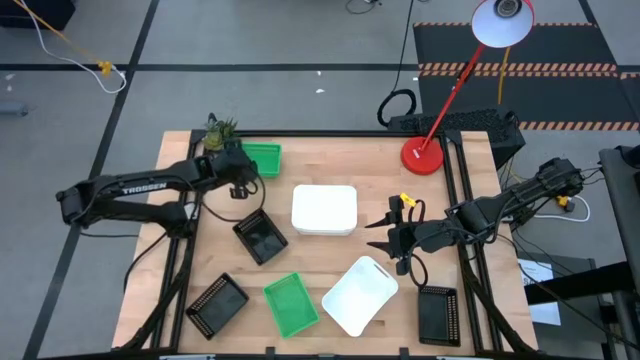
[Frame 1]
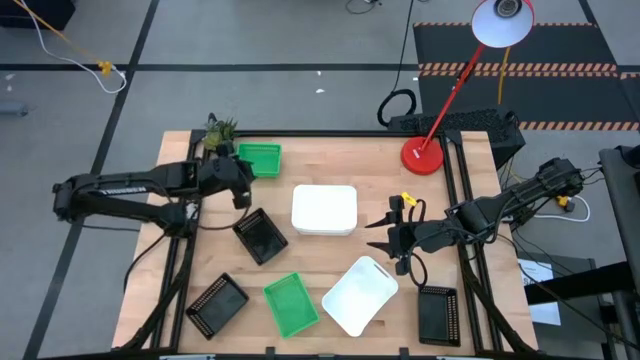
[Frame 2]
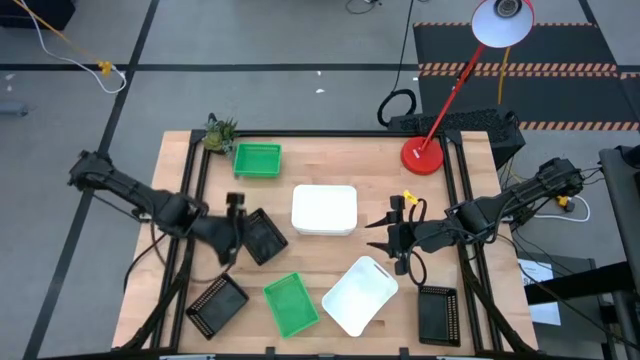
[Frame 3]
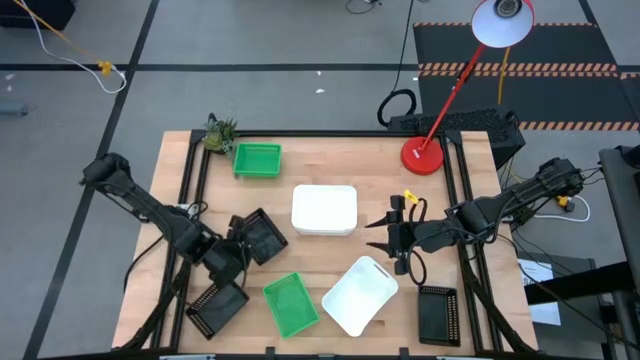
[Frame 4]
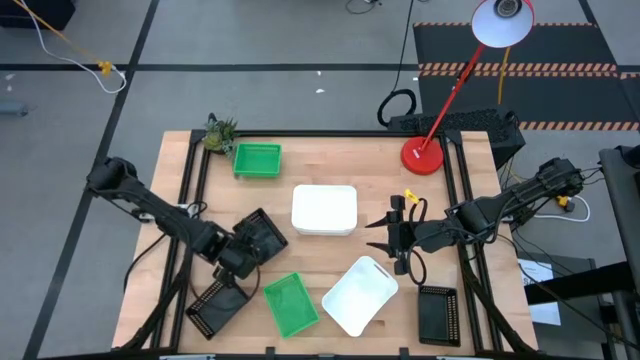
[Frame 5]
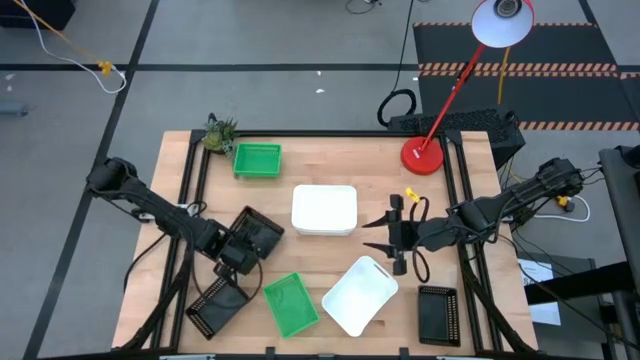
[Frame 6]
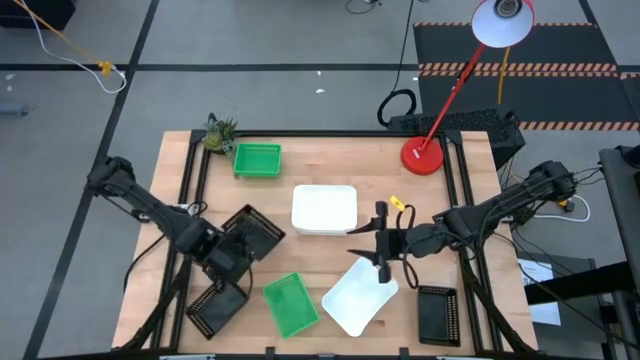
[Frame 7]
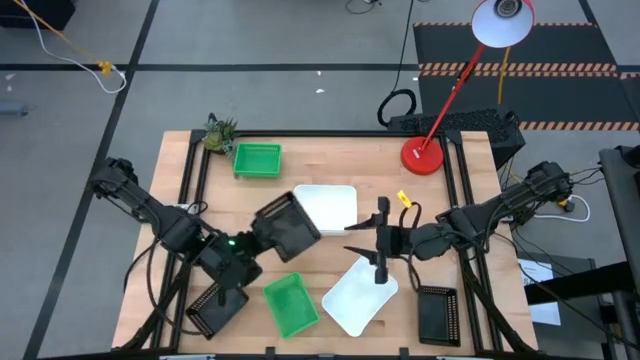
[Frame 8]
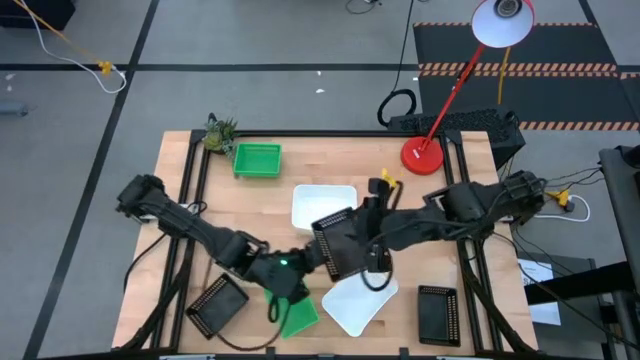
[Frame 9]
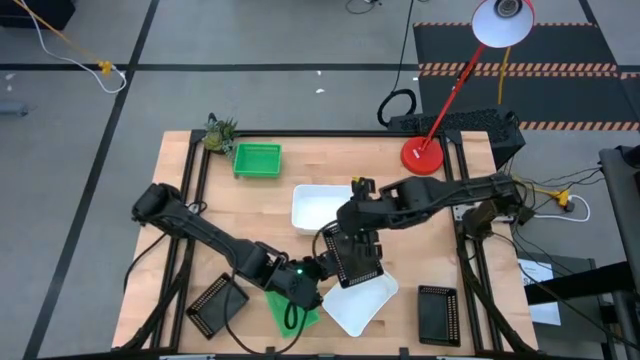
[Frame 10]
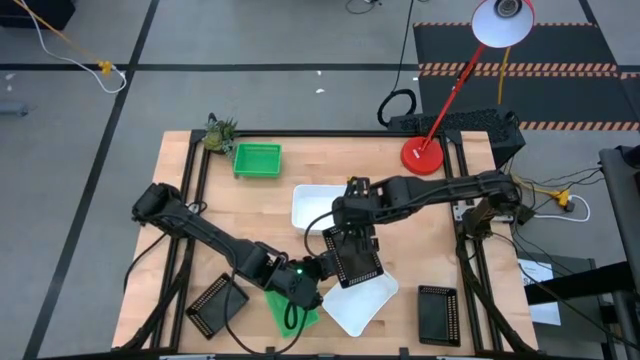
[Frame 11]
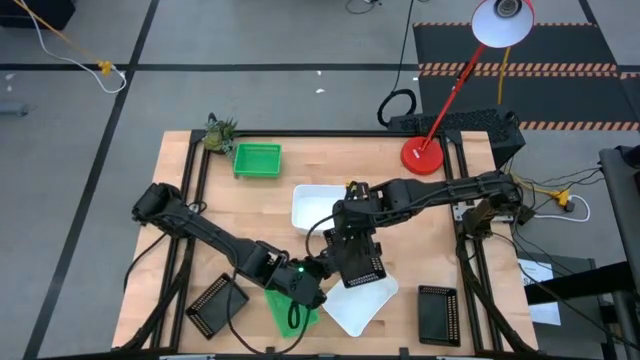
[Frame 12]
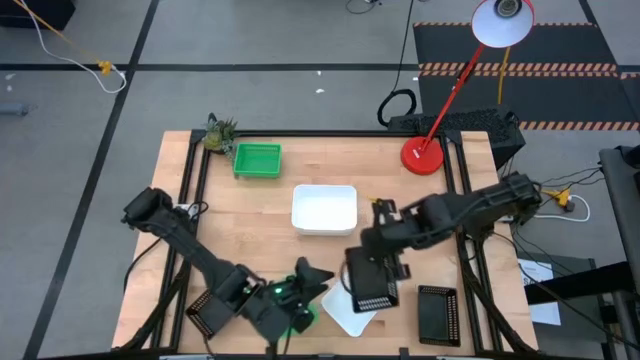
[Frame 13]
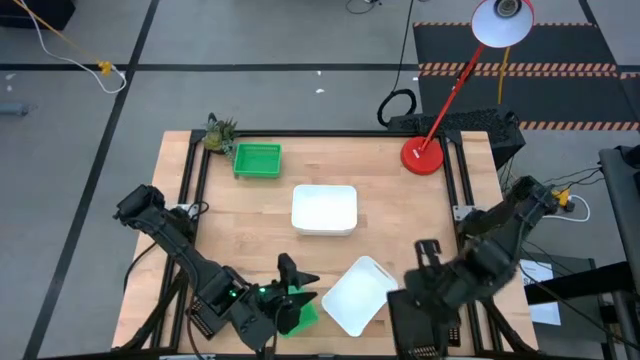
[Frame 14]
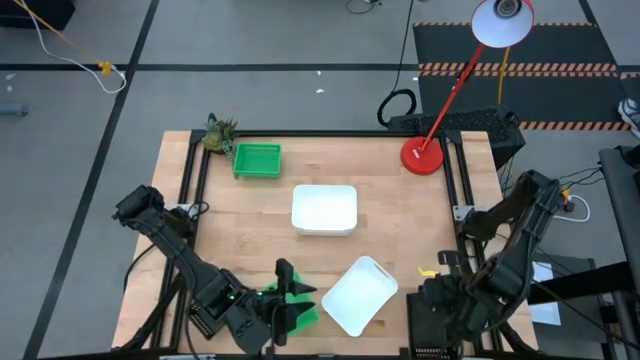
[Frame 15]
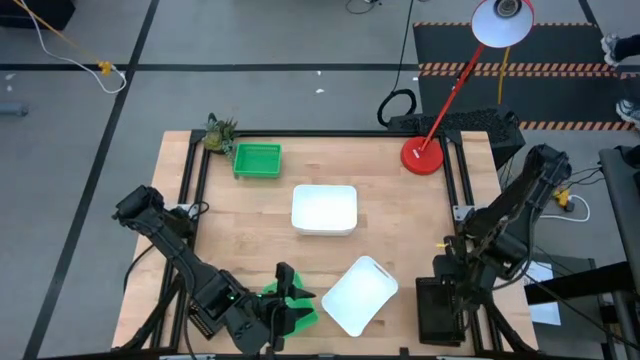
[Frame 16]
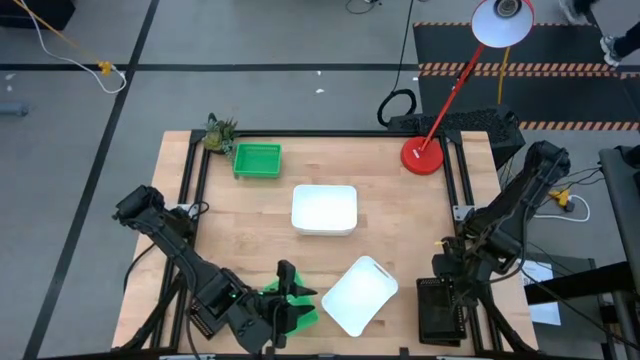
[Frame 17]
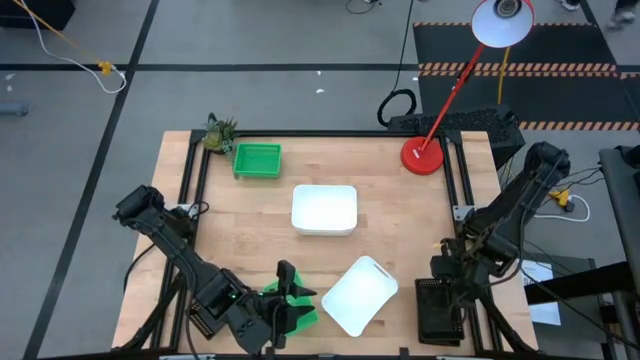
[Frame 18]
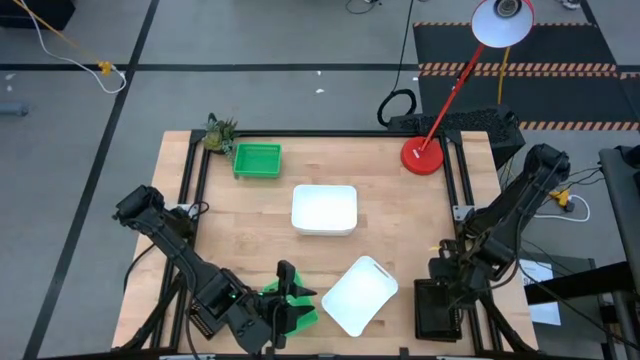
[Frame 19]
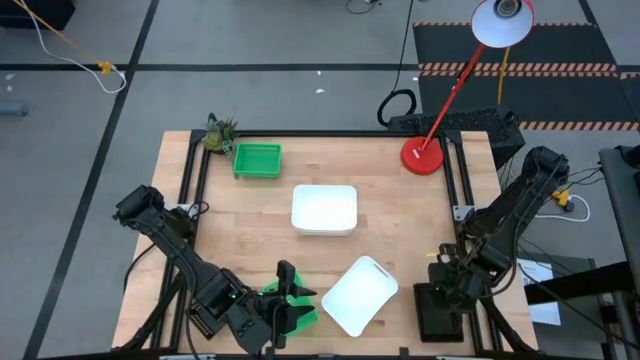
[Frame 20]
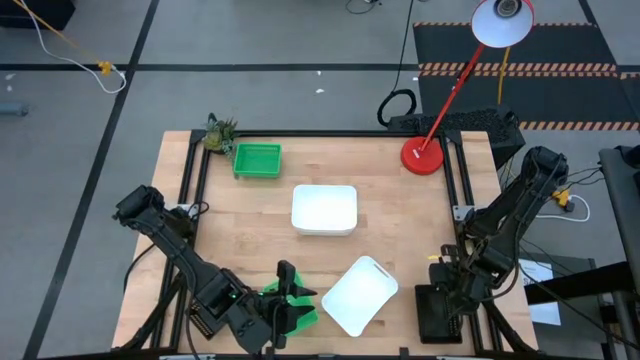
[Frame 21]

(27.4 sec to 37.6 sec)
Stack the top left black bin on top of the bottom right black bin

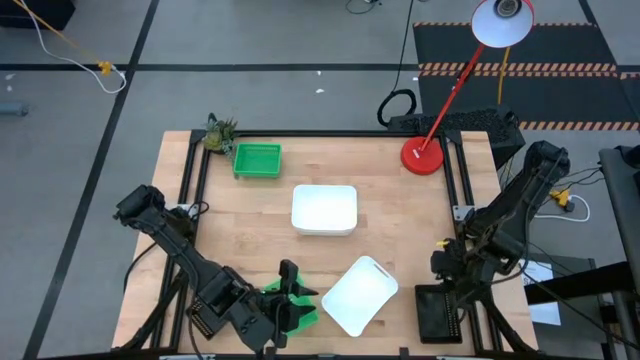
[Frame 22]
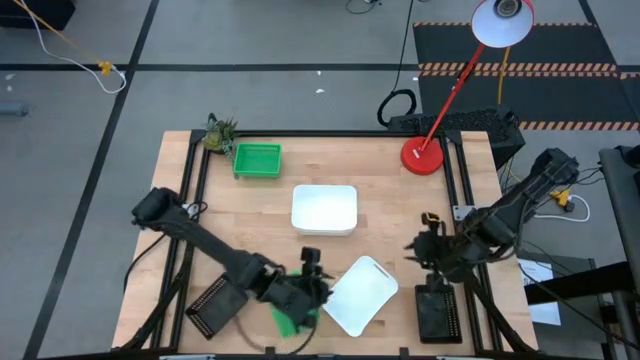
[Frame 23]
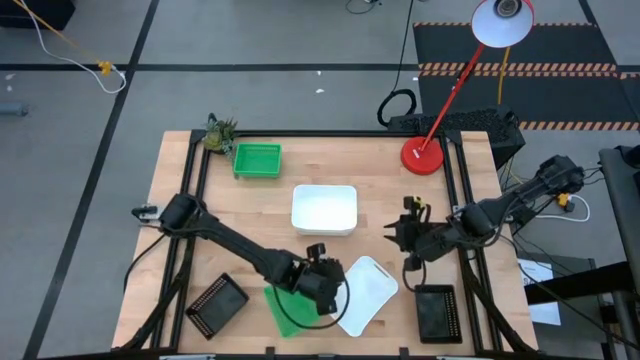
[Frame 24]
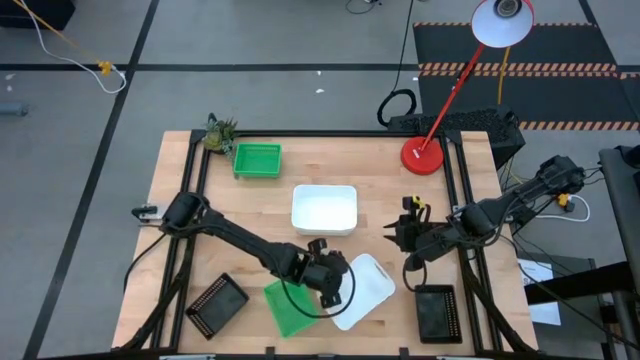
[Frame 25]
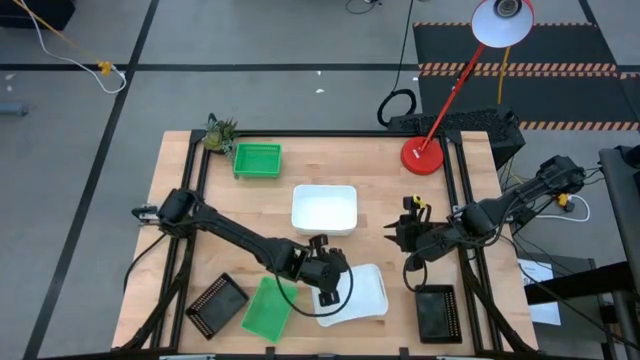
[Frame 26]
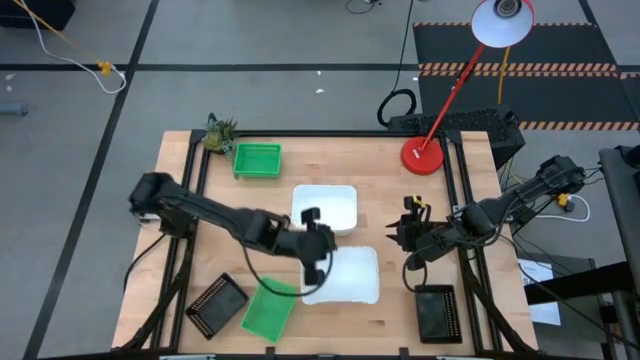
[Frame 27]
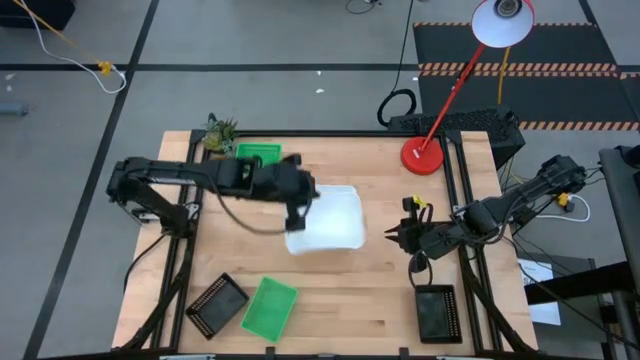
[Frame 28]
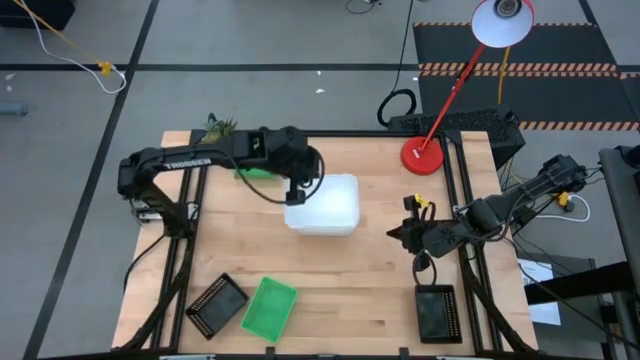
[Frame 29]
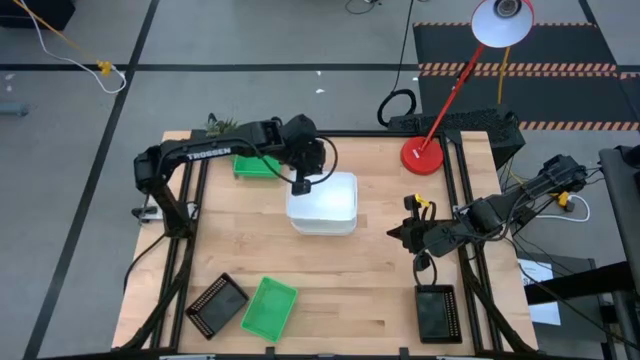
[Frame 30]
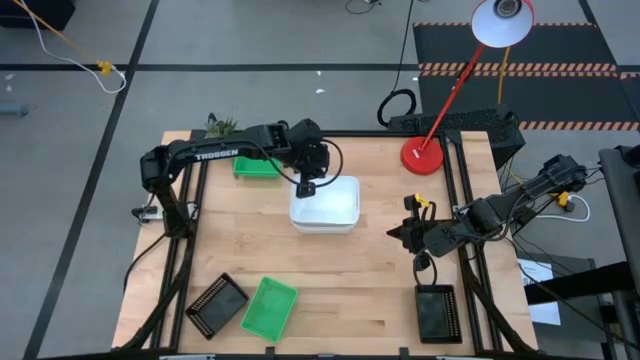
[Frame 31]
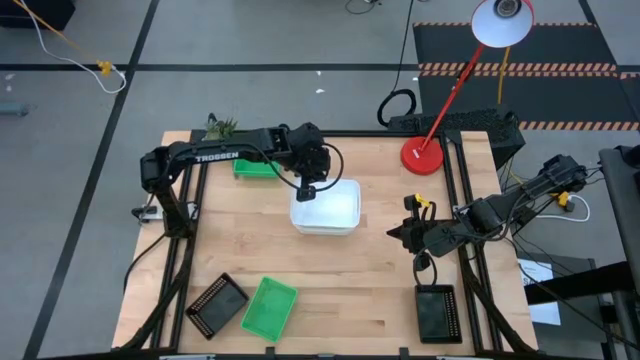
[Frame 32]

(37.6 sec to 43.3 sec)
Stack the bottom white bin on top of the top white bins
